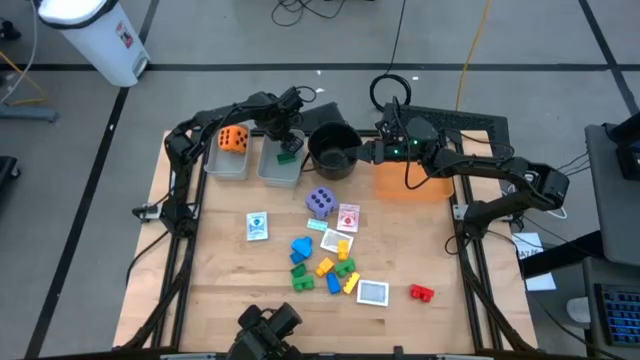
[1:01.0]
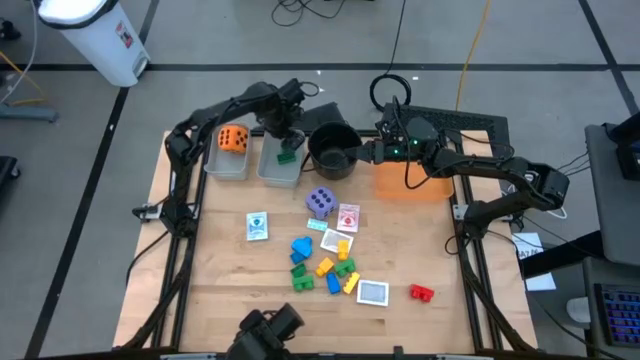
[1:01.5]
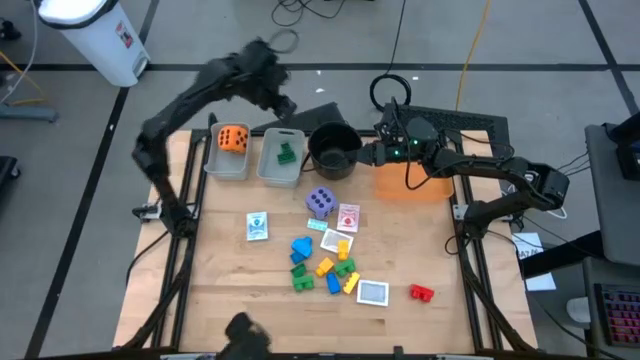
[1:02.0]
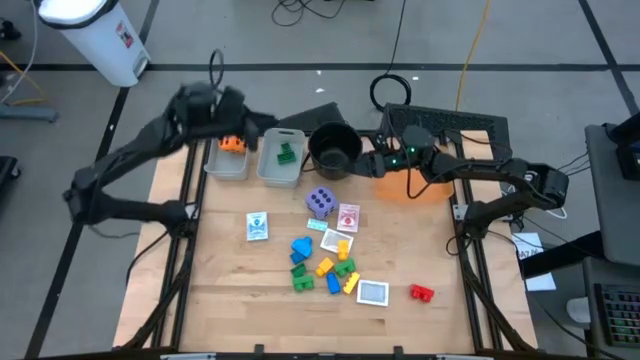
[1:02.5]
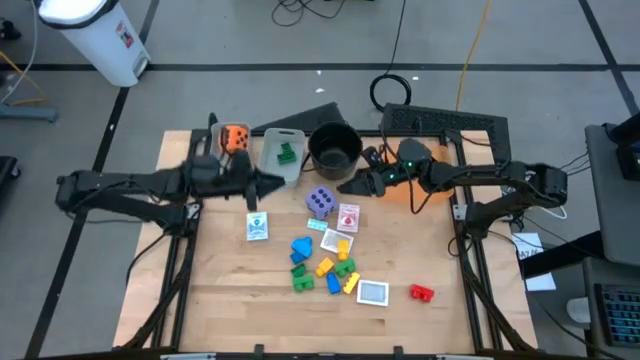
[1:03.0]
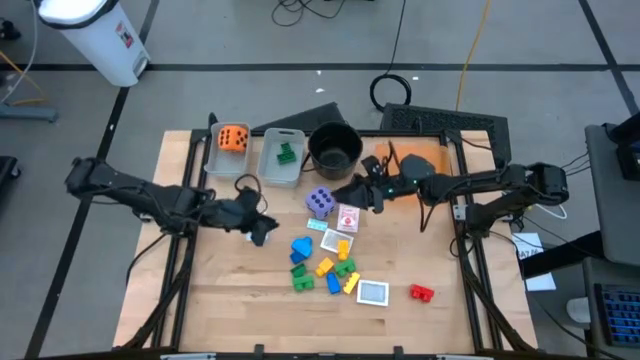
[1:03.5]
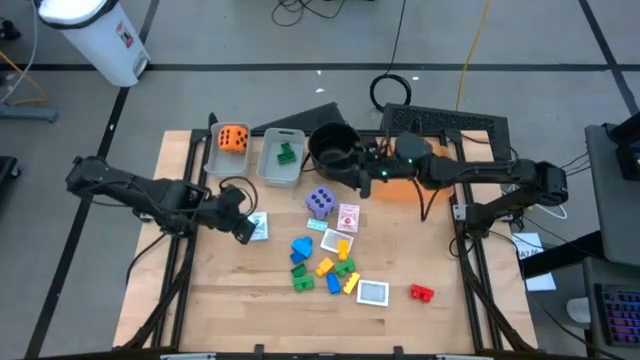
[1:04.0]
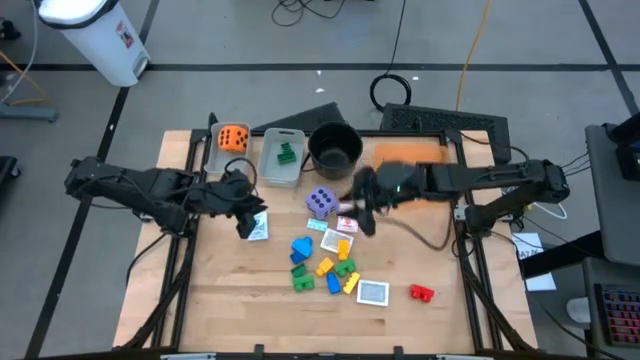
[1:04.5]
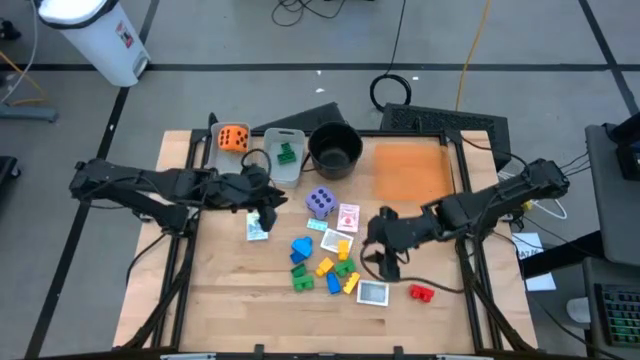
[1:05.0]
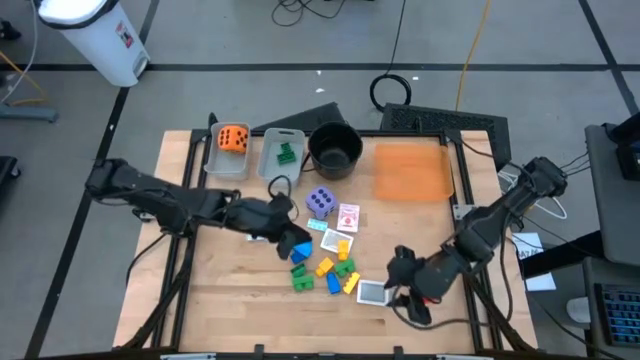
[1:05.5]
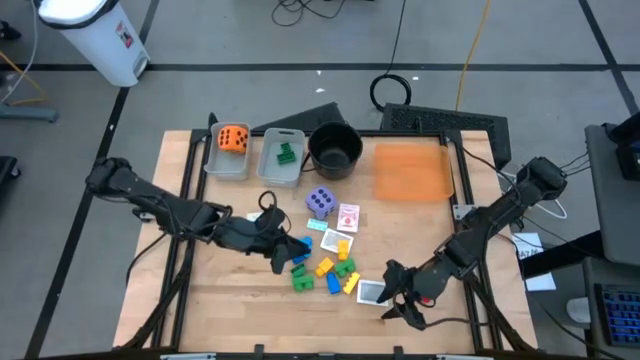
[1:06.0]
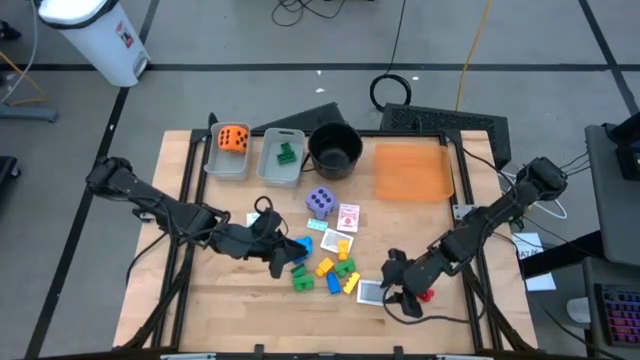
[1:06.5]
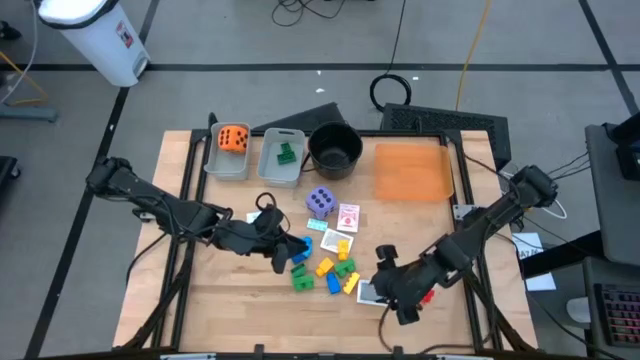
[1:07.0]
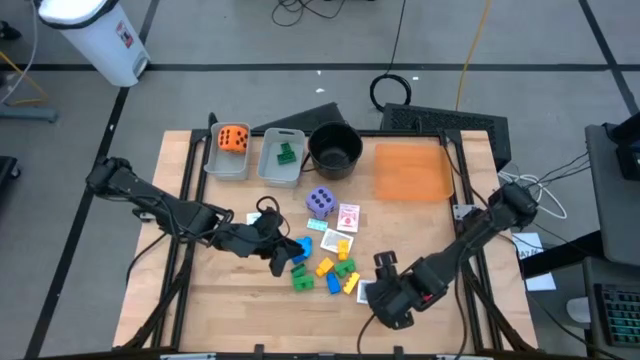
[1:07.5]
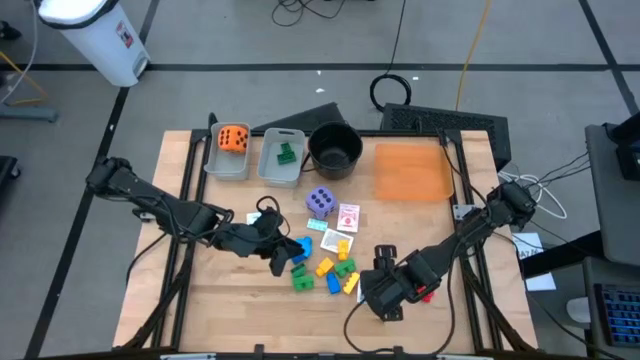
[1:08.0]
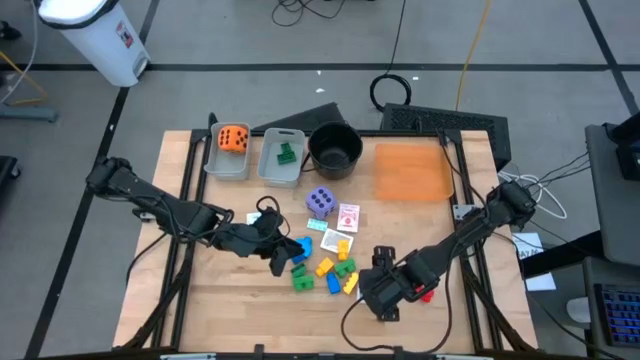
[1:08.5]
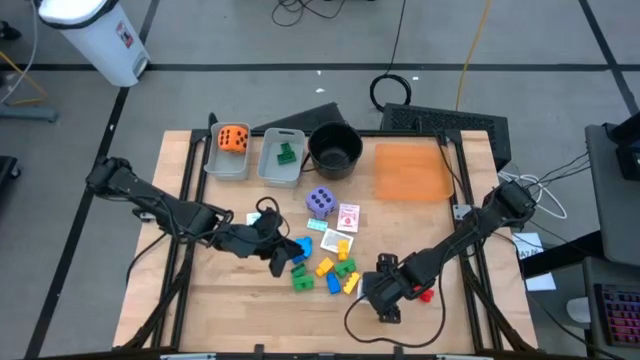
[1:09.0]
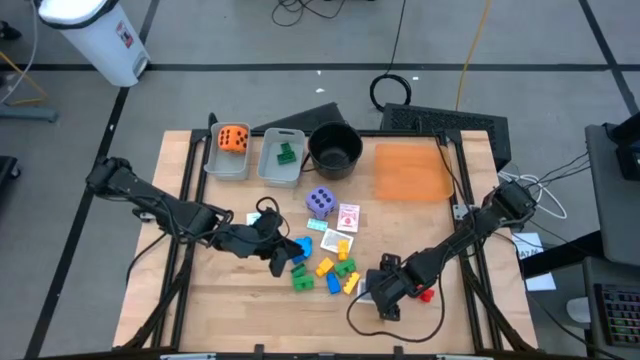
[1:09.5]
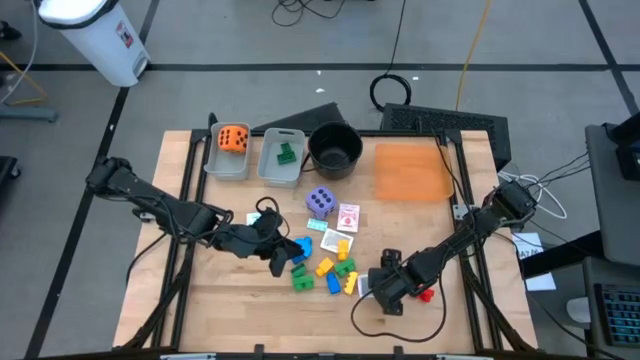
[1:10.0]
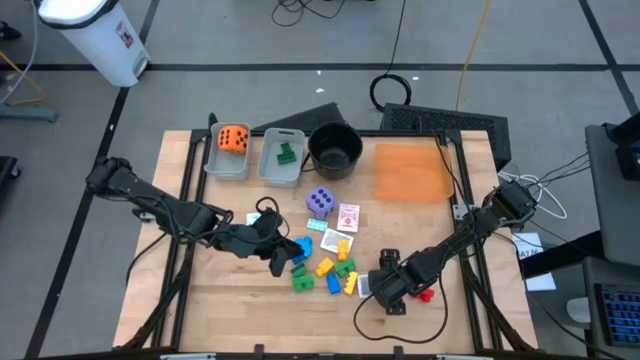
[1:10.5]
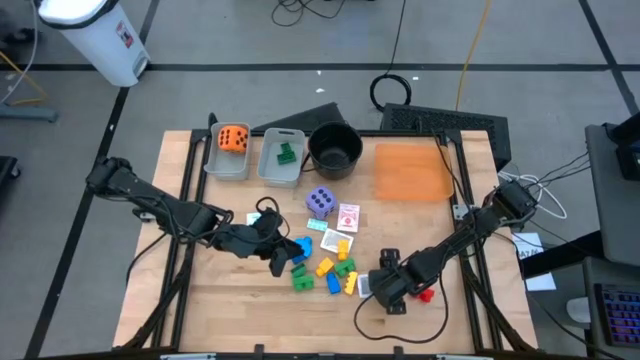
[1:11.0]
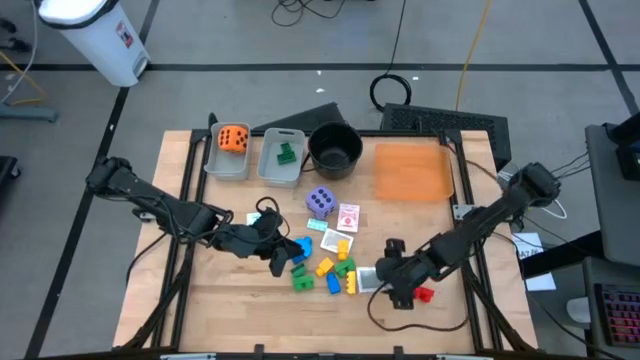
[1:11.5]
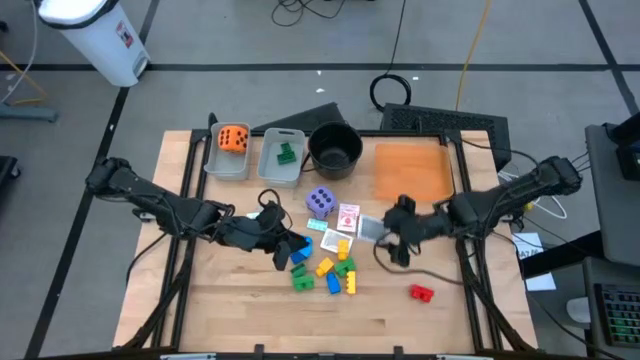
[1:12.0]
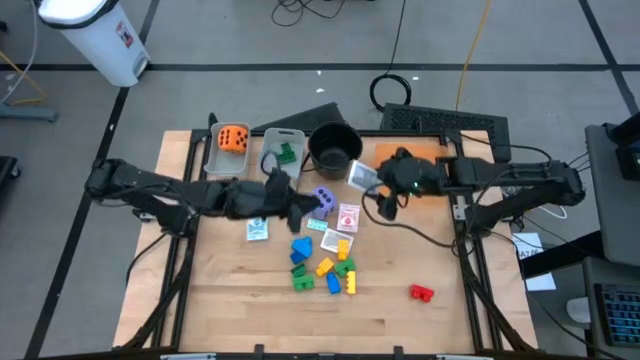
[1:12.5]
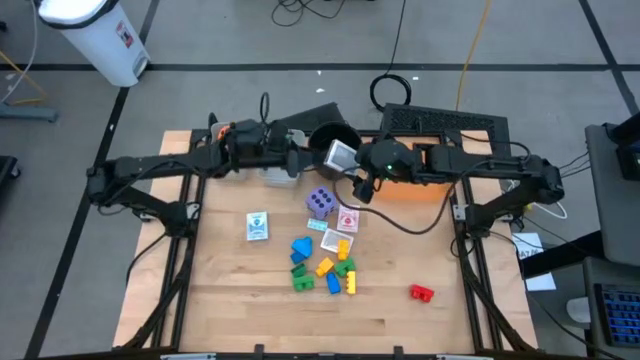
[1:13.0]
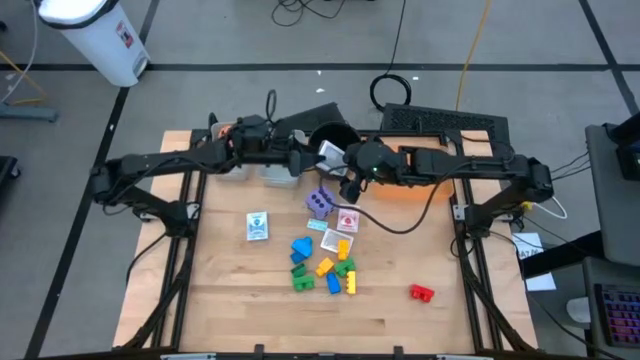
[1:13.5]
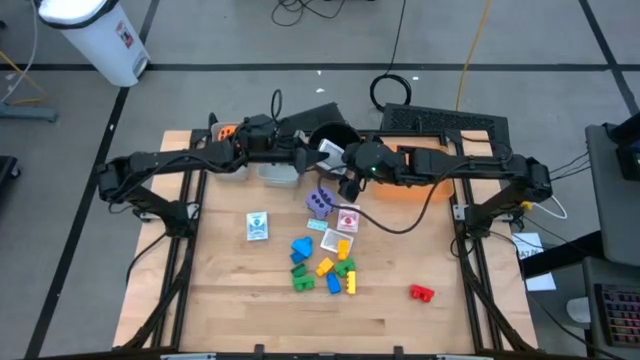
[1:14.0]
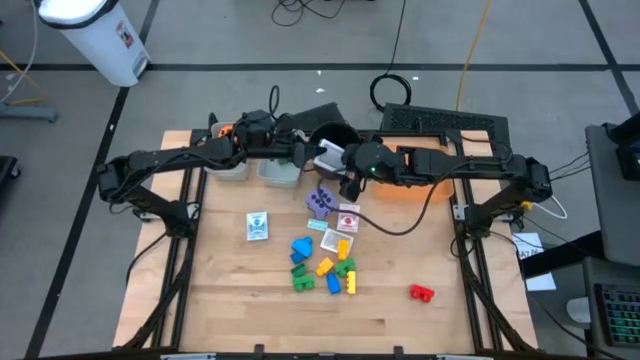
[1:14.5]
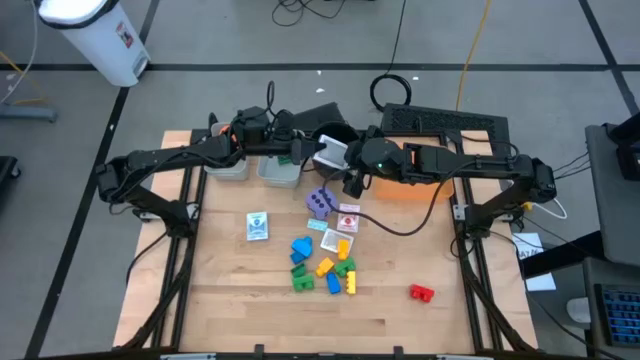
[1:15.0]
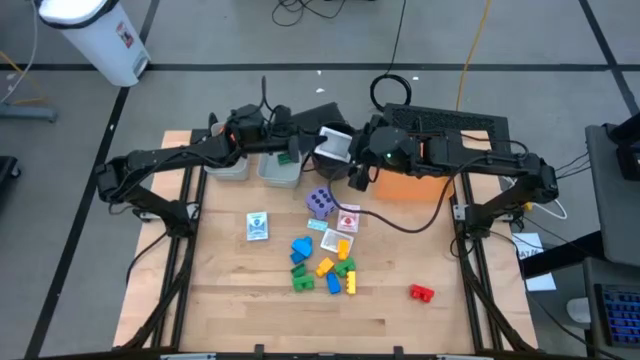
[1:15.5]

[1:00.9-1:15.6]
Task: Pick & Place Toys
Put the black deck of cards into the orange bin

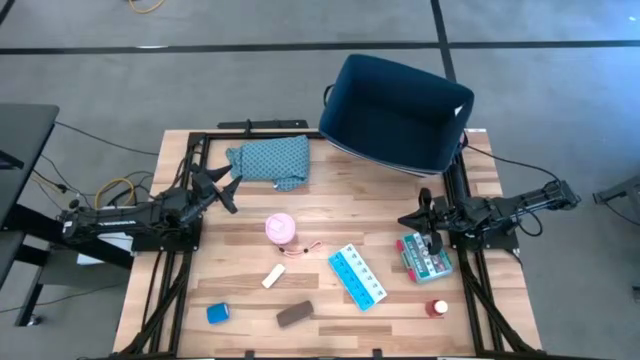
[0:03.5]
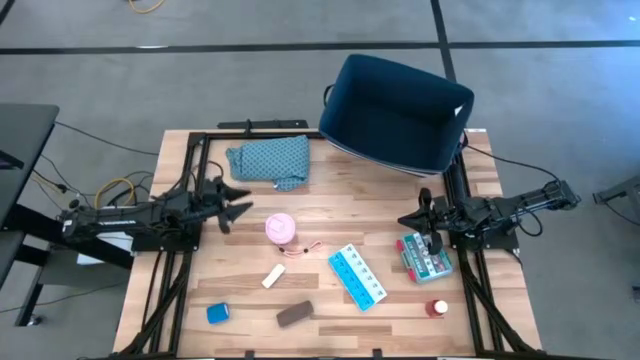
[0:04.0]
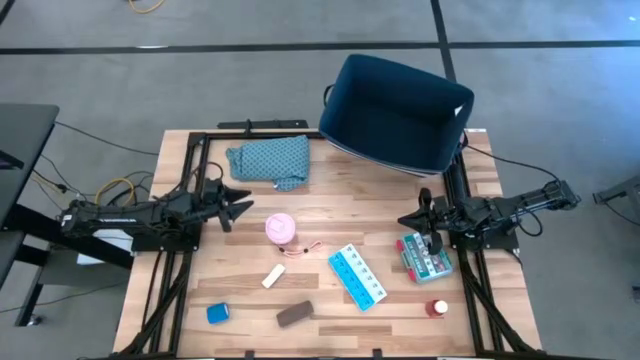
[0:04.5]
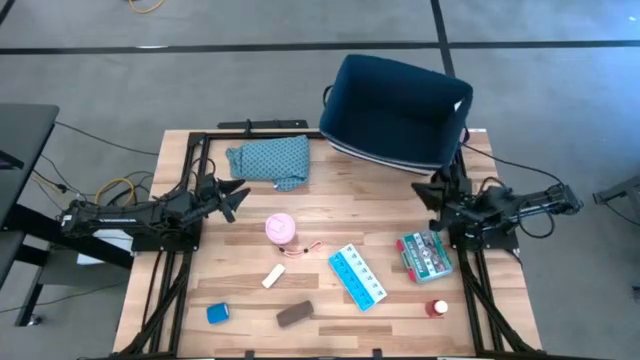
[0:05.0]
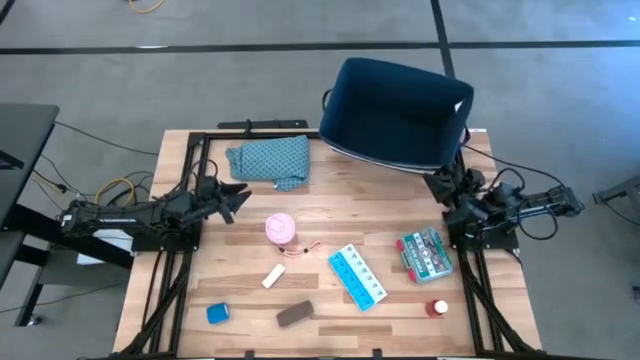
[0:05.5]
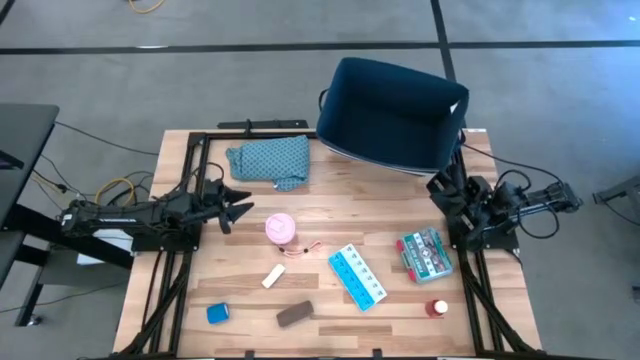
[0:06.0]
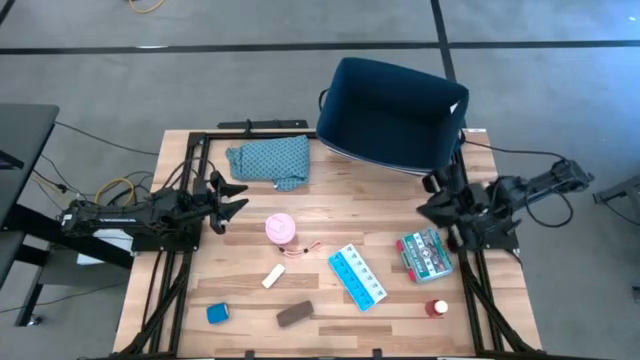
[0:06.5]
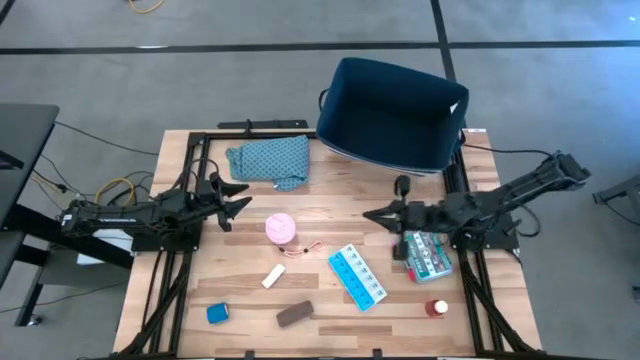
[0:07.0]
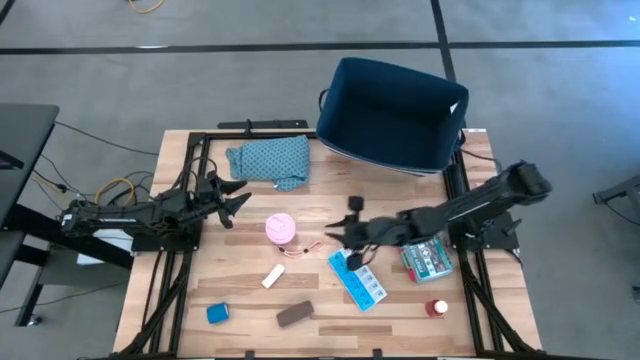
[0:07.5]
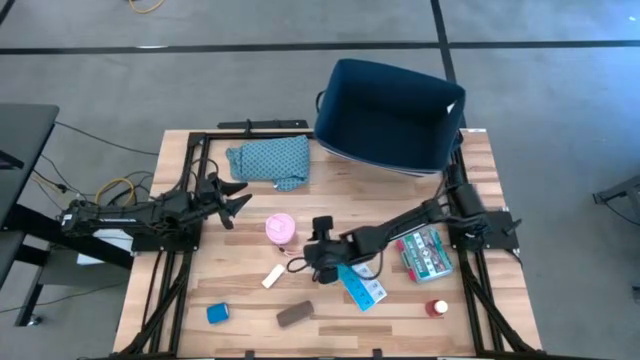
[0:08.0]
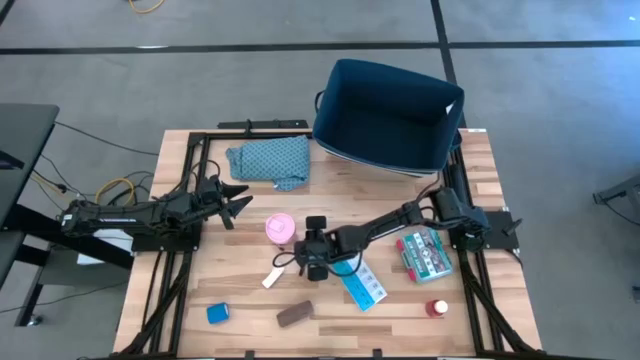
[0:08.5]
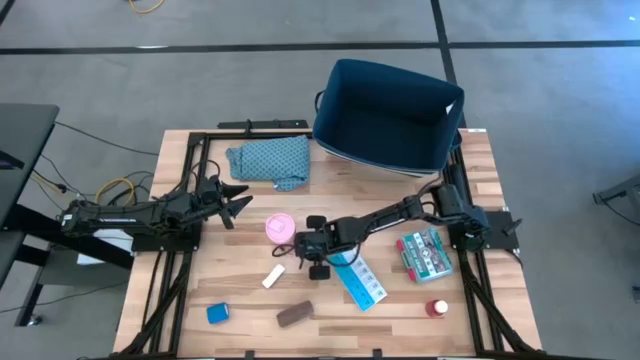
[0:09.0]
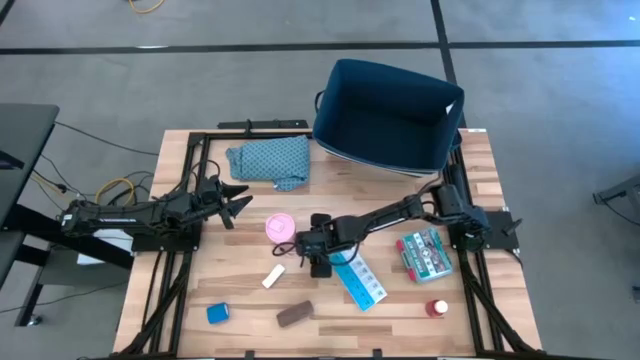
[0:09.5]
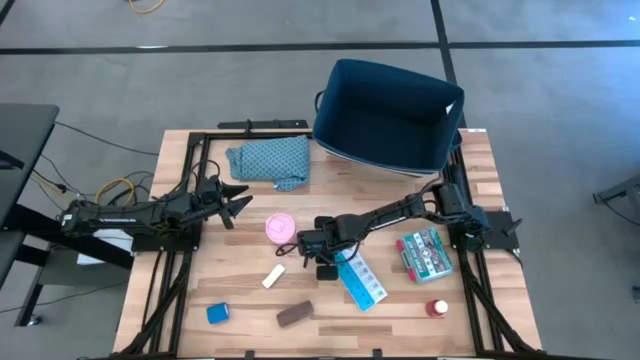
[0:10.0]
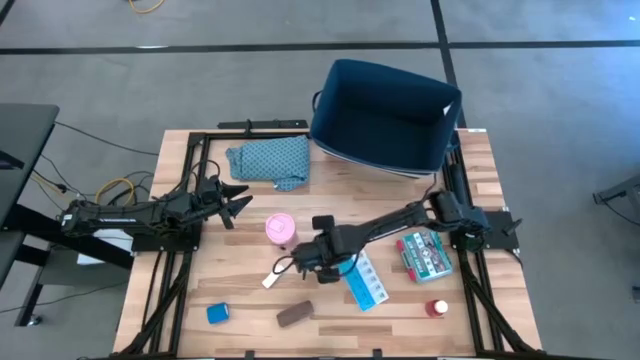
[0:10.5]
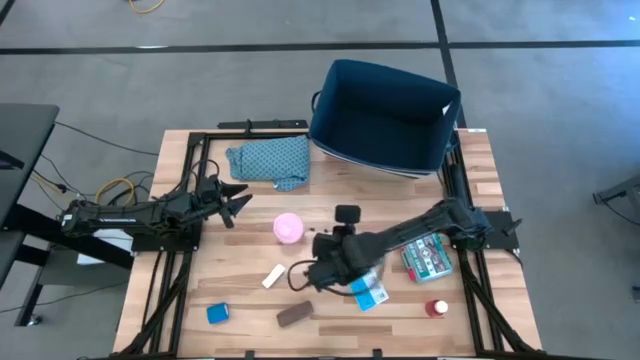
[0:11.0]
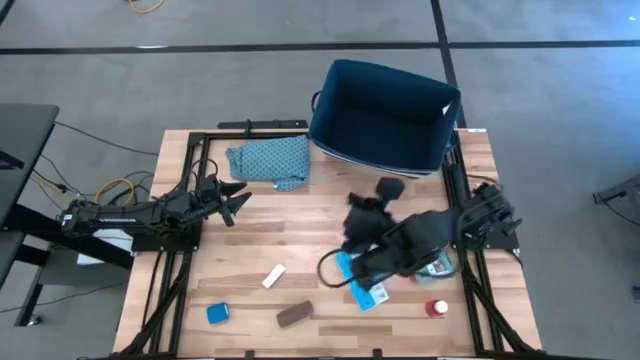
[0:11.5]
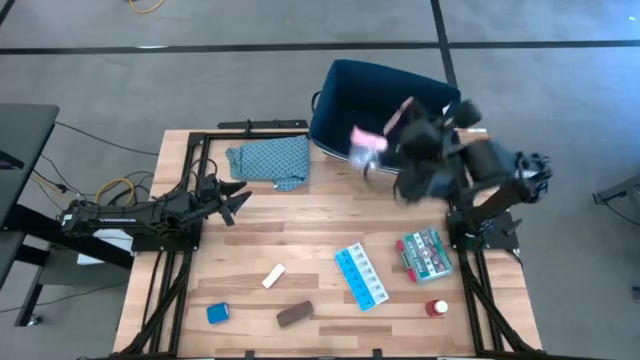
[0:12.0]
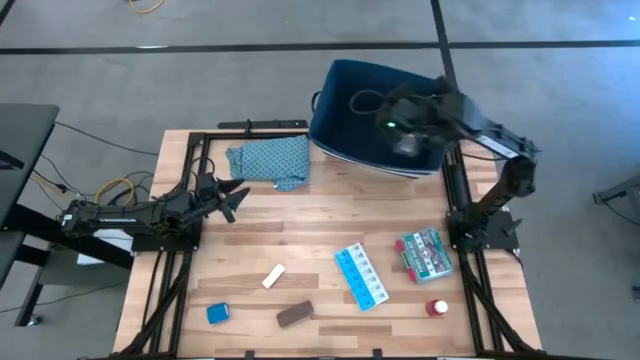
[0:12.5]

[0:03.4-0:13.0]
Task: Pick & place medical supplies in basket/bin
Put the pink tumbler into the blue bin
